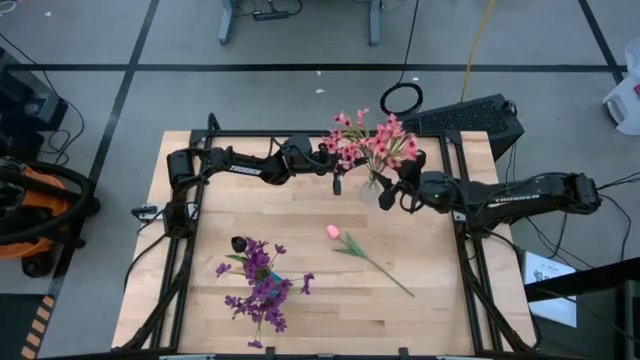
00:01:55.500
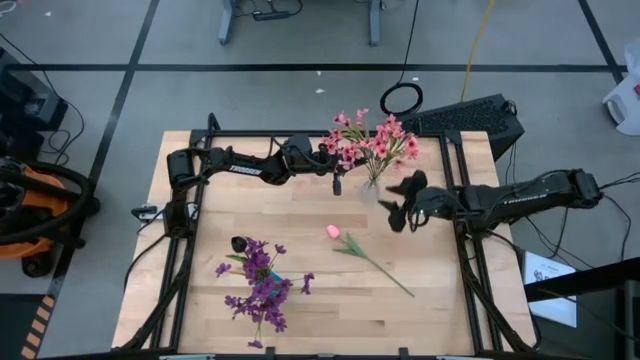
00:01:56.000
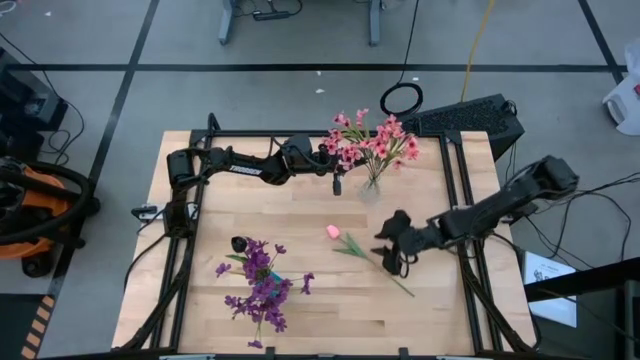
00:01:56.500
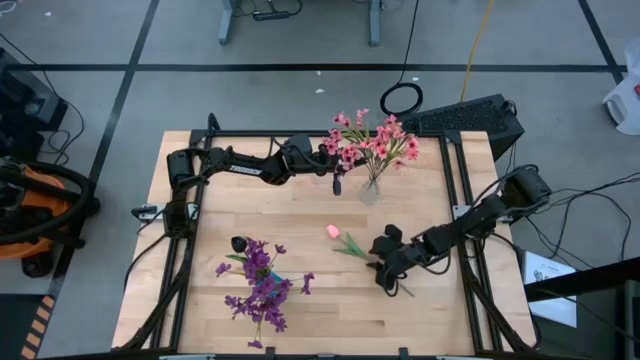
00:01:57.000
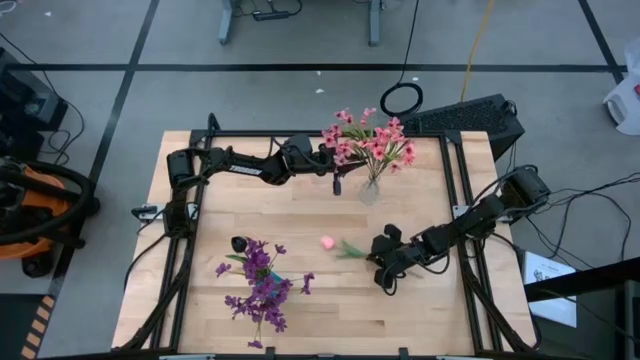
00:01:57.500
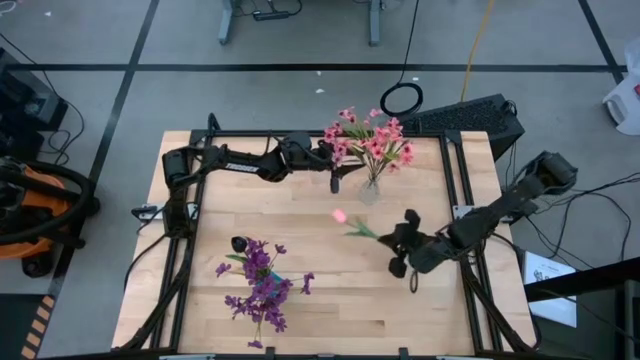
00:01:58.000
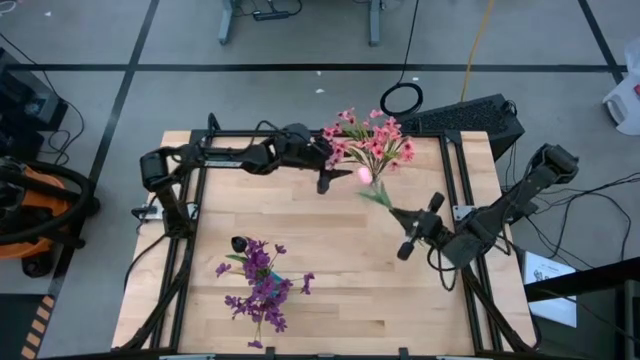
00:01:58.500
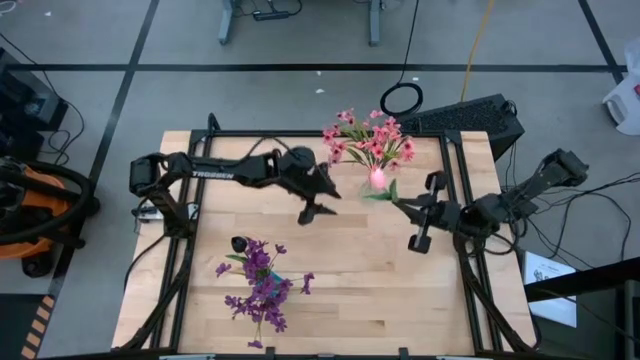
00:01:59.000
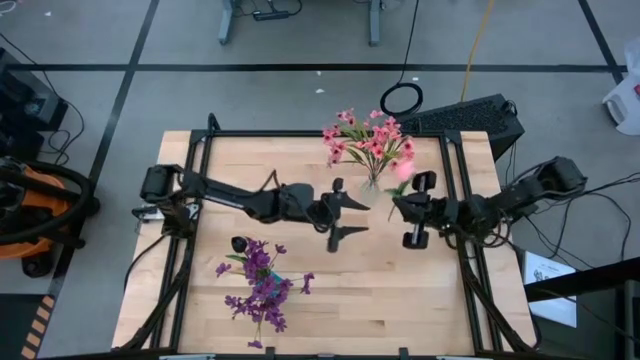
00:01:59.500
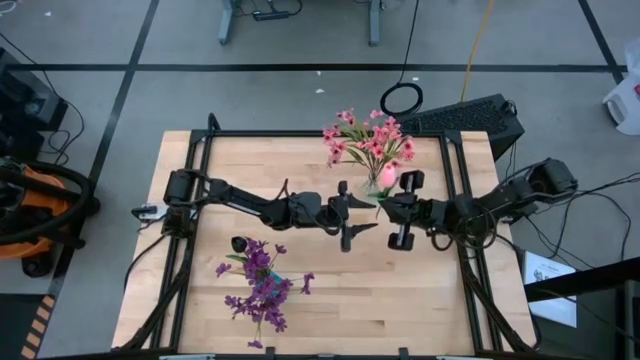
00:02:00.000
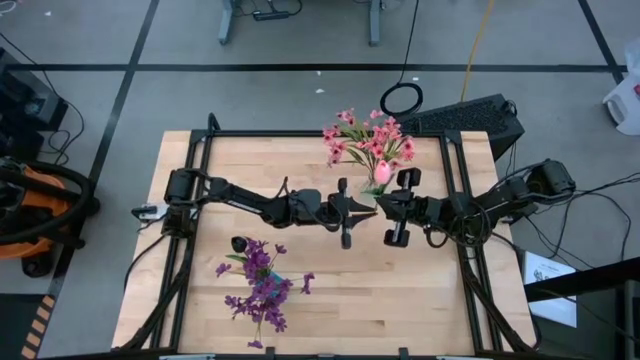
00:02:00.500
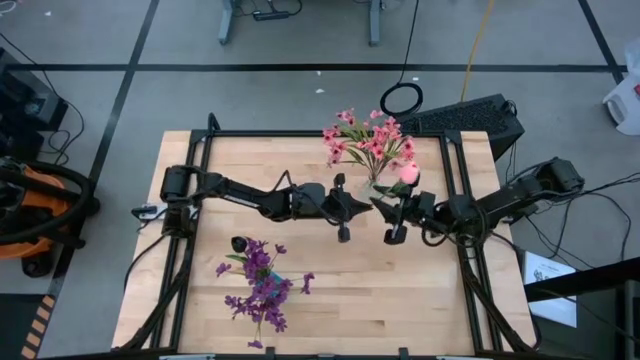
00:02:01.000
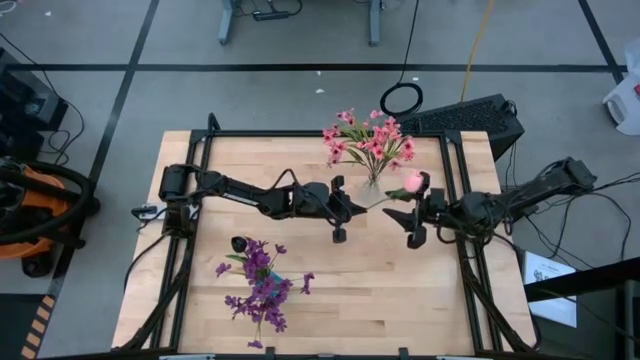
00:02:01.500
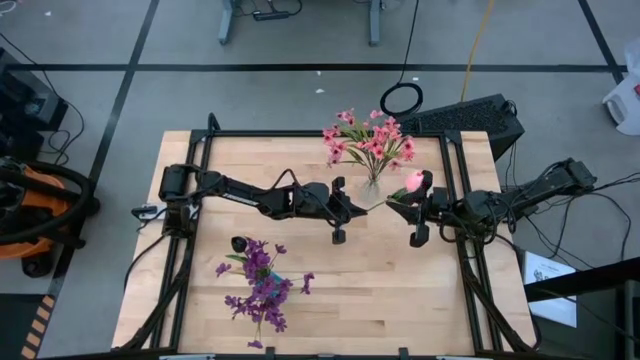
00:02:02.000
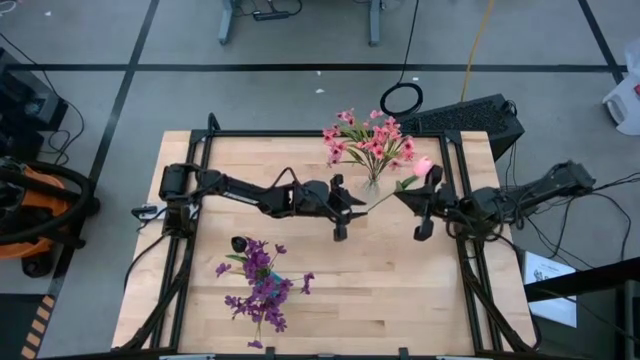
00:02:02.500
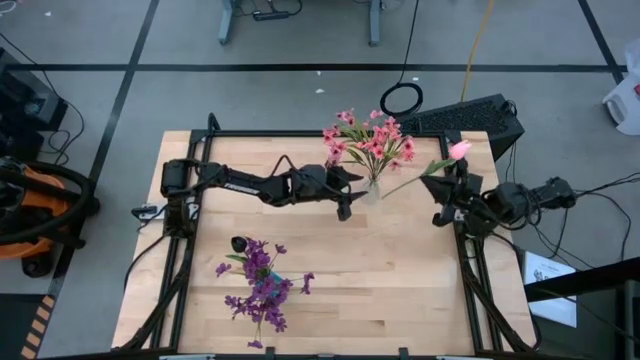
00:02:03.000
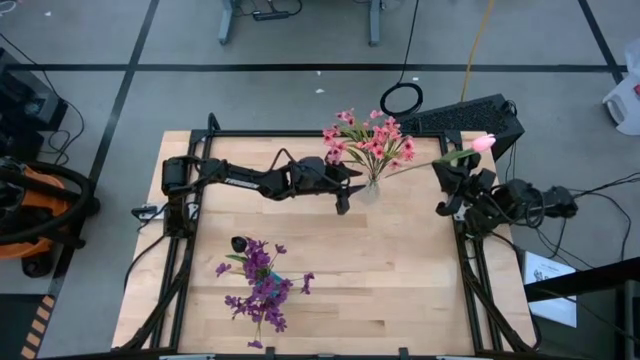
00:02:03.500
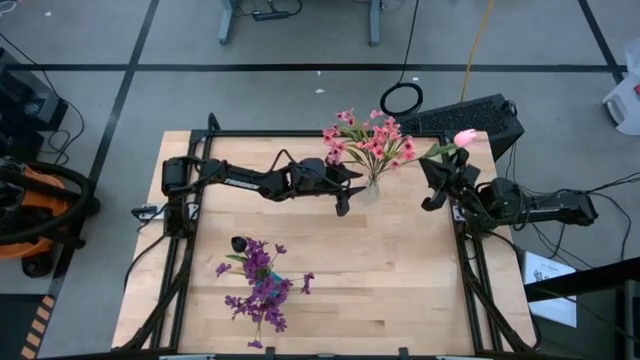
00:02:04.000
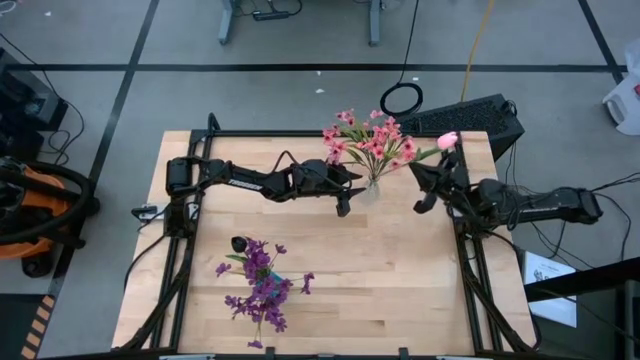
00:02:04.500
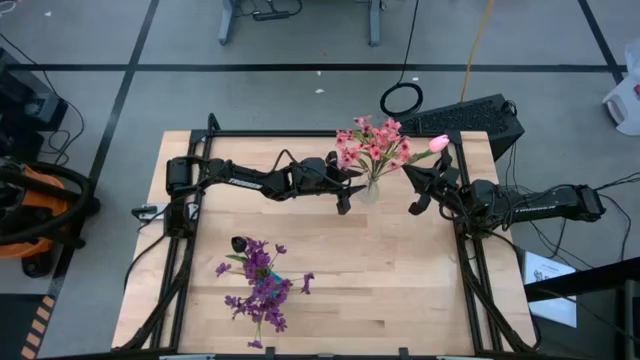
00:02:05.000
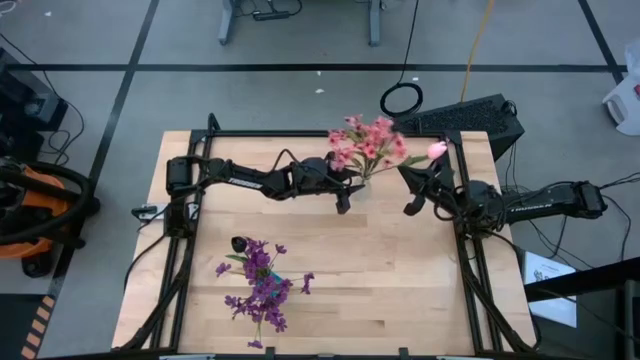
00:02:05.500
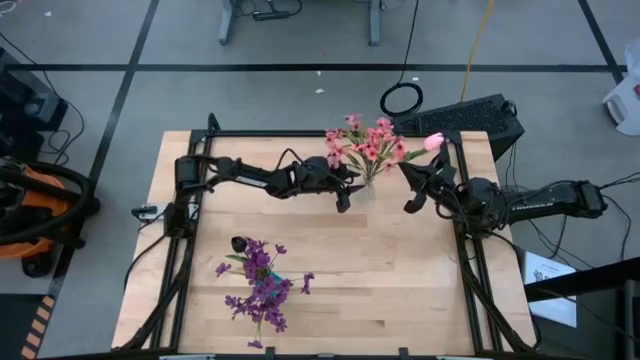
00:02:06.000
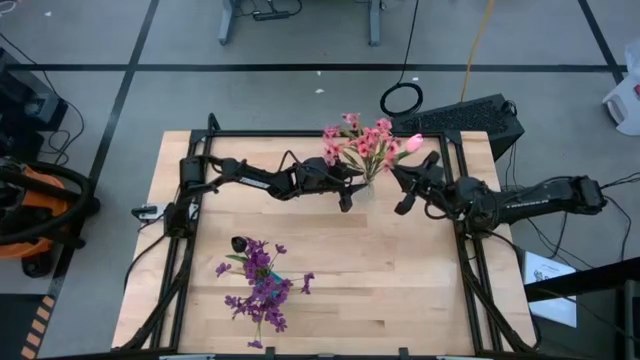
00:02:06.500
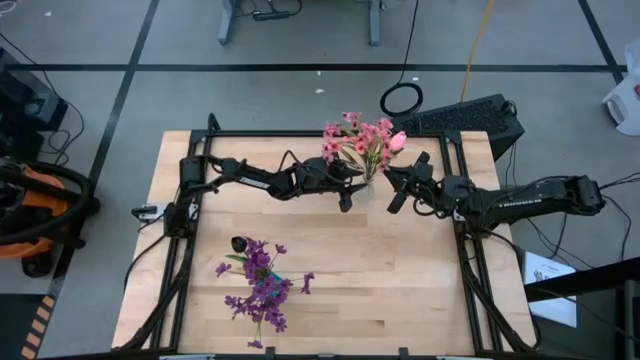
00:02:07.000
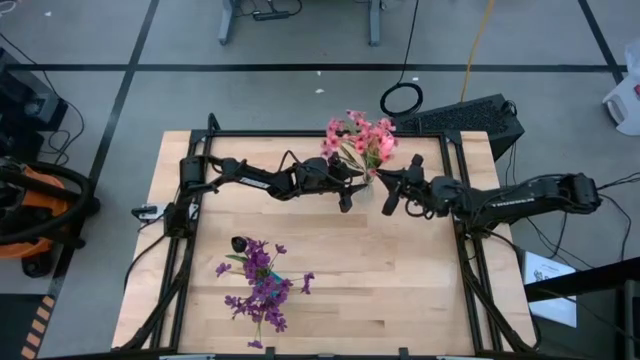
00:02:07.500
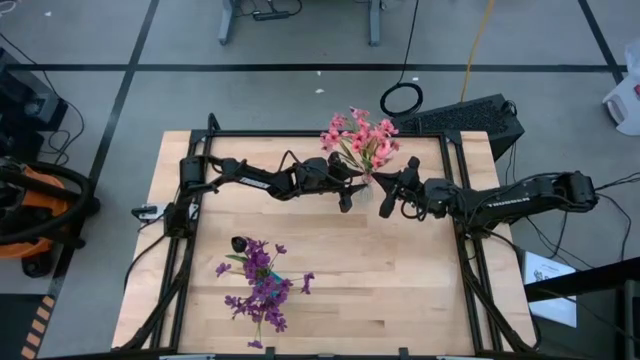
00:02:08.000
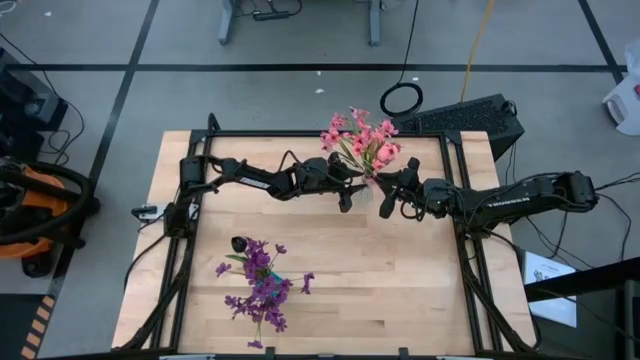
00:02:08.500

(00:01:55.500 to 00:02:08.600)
Task: Sort flowers into vase by color
Put the pink tulip into the transparent vase

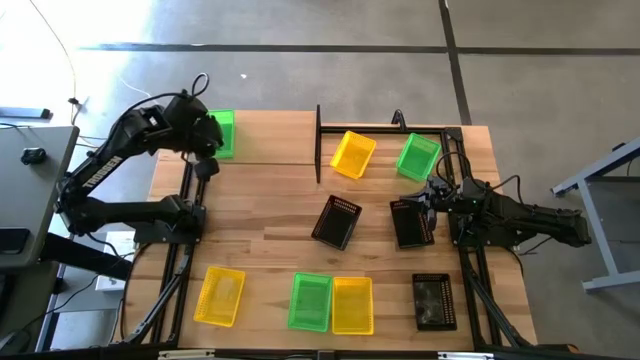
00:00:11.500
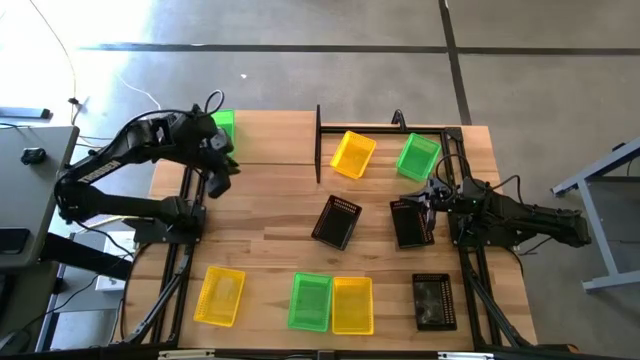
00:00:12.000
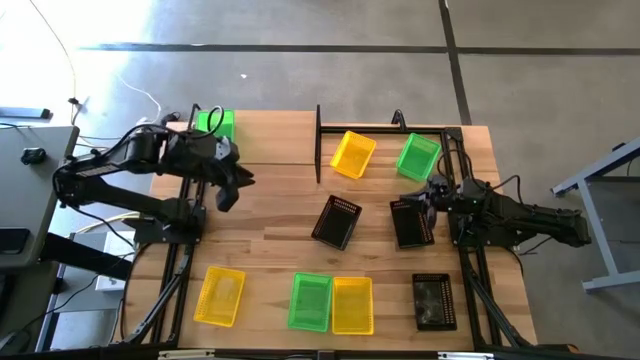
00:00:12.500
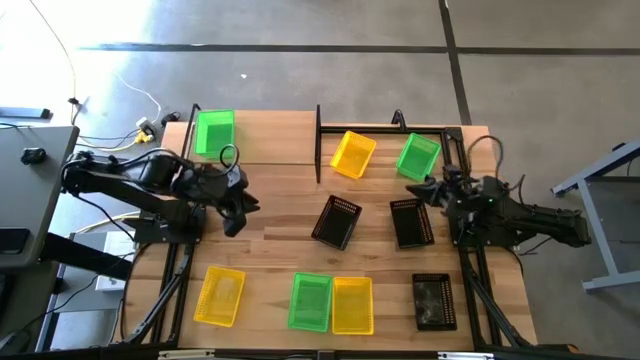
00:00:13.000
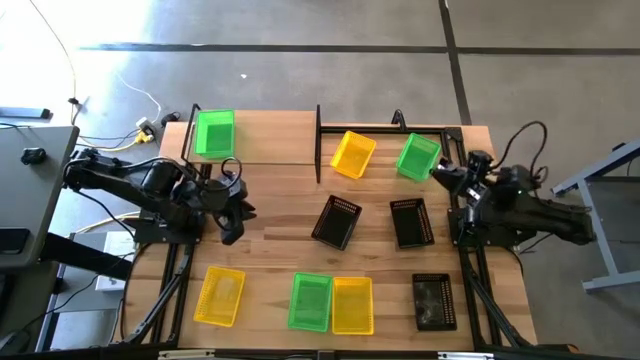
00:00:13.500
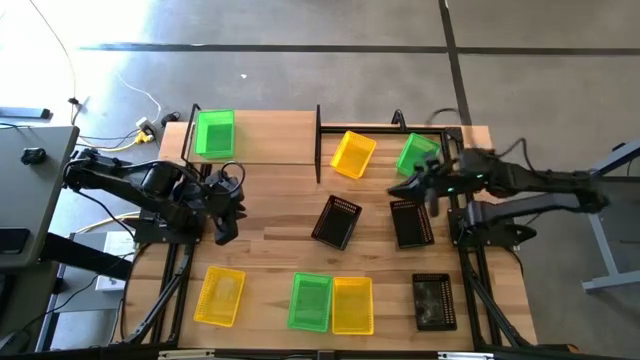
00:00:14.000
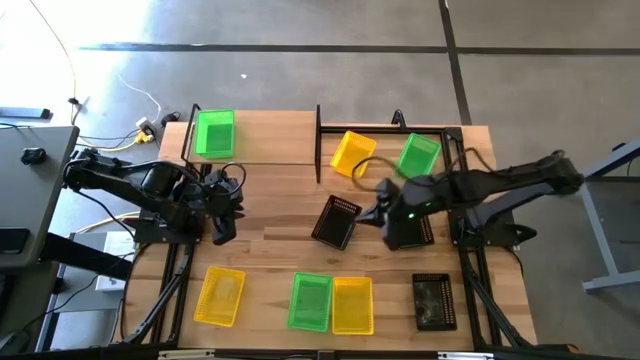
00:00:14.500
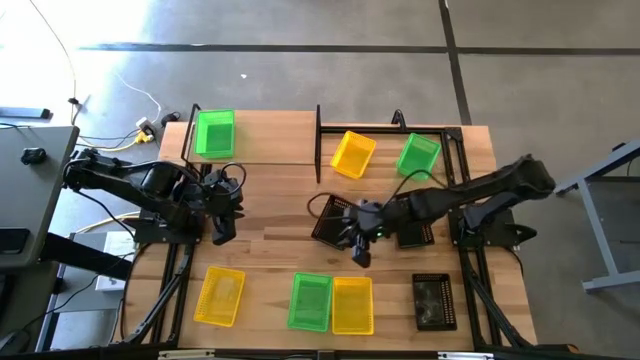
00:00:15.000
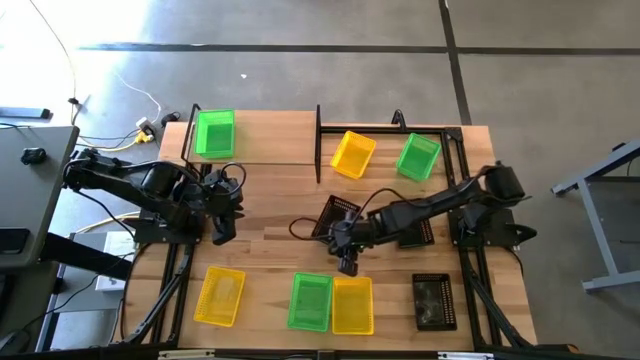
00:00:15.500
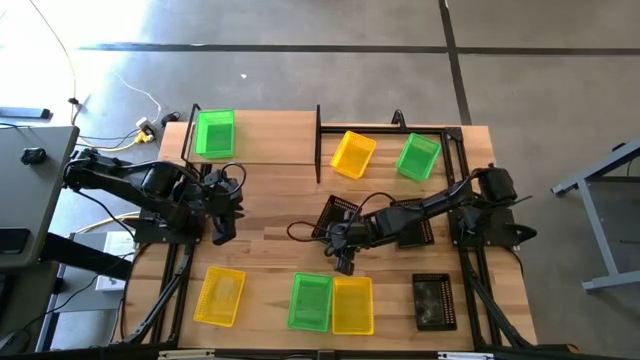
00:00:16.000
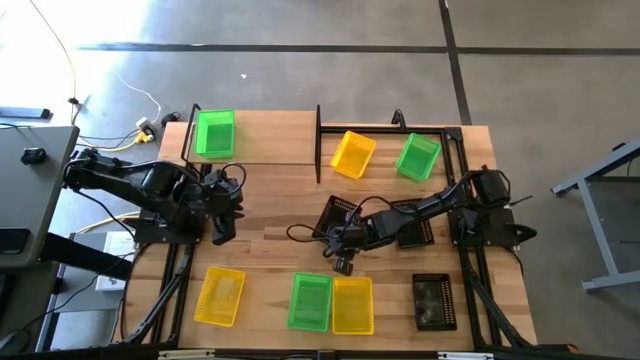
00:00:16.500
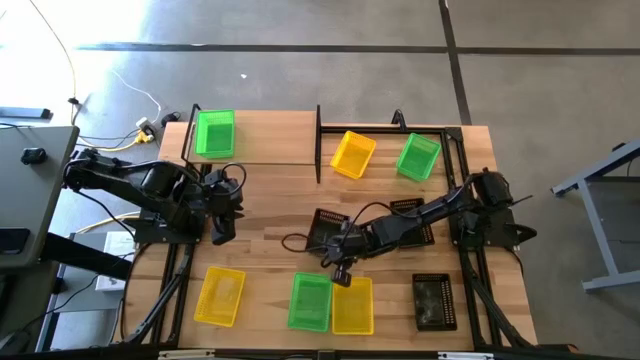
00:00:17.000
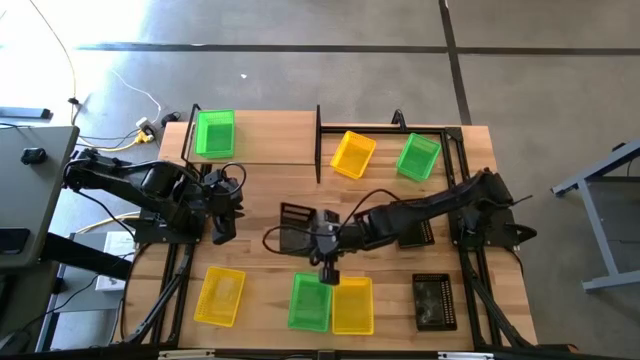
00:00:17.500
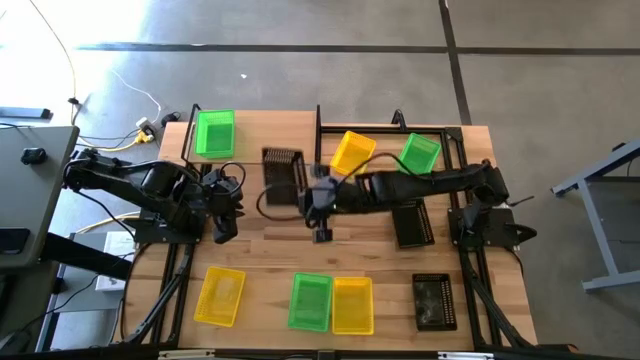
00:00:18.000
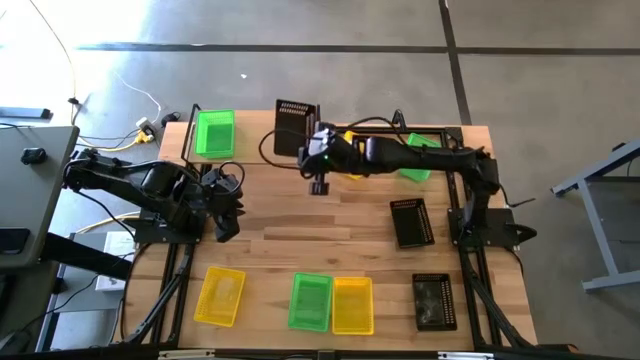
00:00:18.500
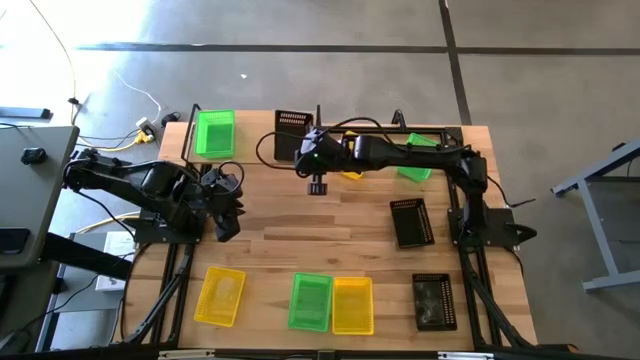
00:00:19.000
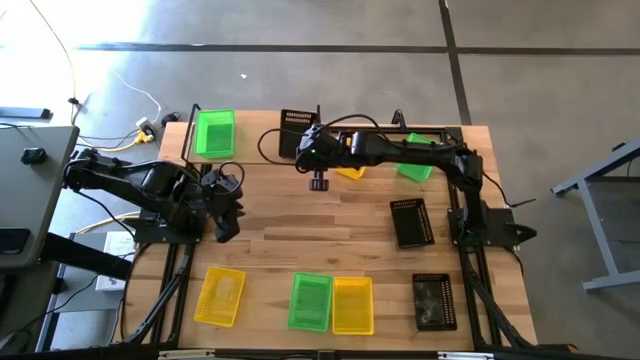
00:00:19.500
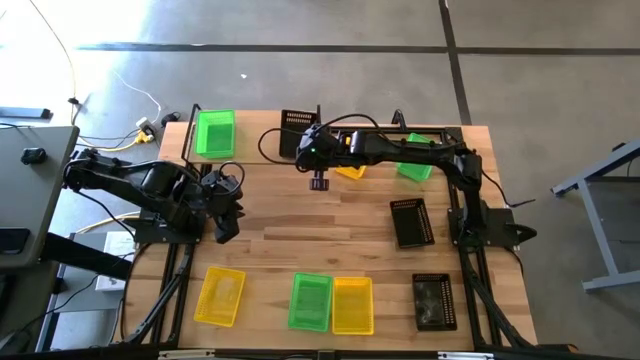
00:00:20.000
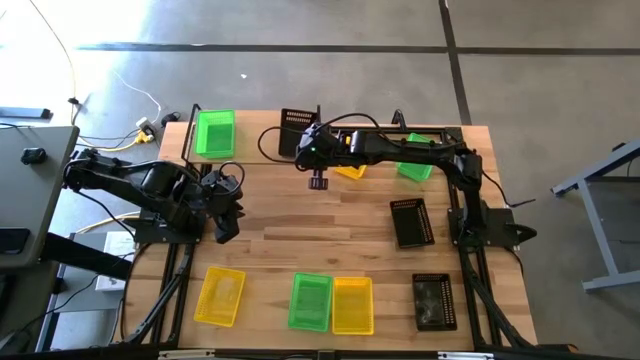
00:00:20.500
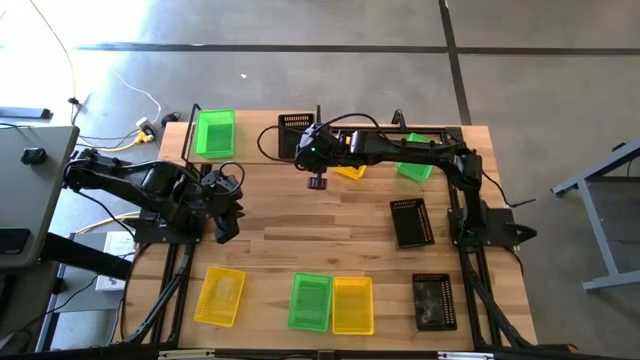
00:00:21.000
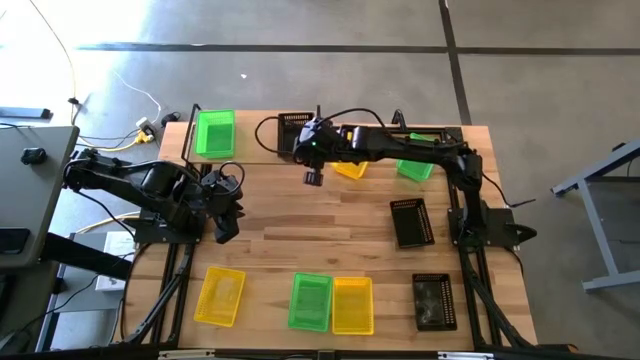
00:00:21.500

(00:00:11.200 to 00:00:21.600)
Task: Stack baskets on shelf by color
Put the top left black bin on the shelf
